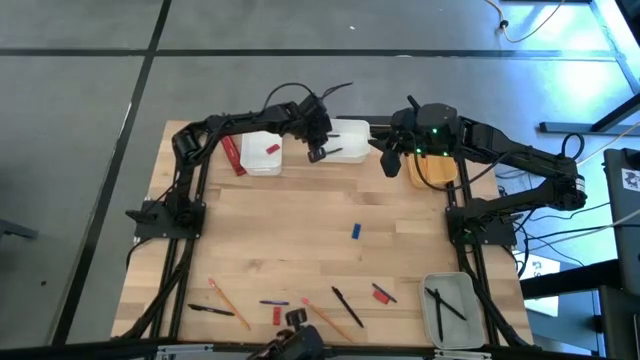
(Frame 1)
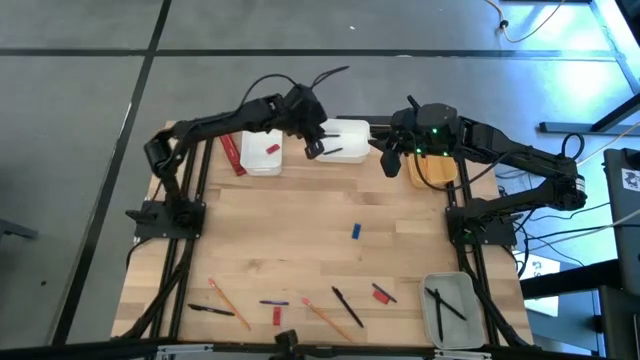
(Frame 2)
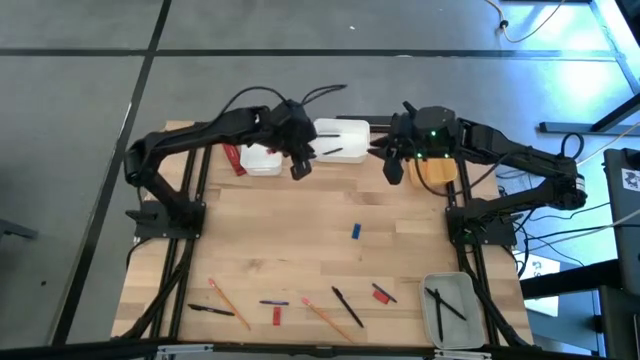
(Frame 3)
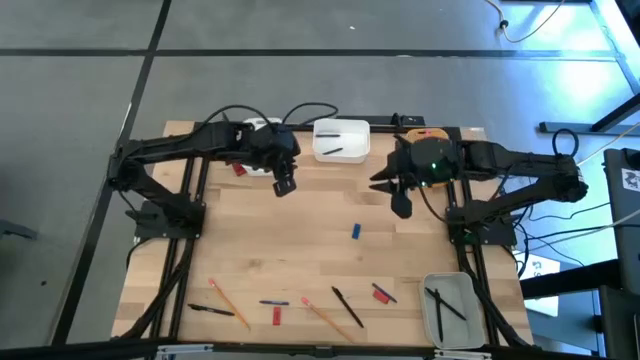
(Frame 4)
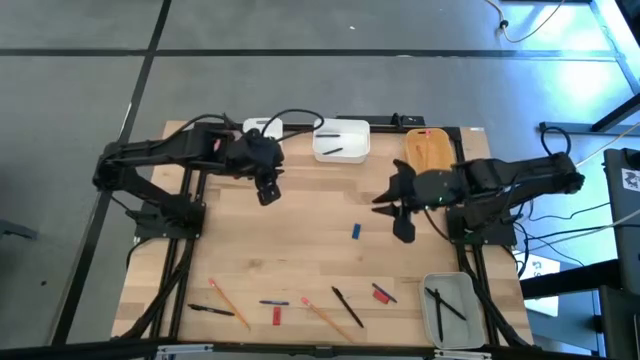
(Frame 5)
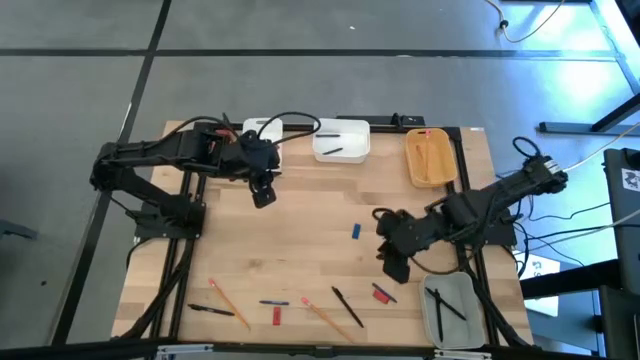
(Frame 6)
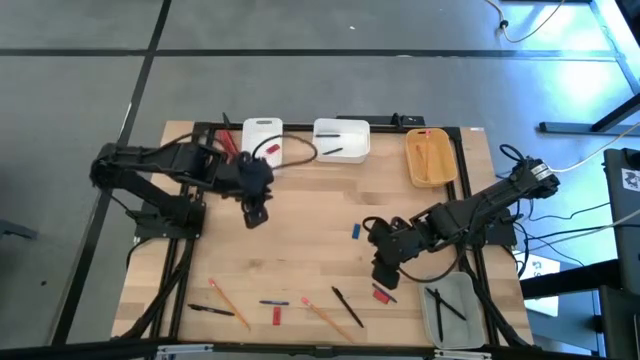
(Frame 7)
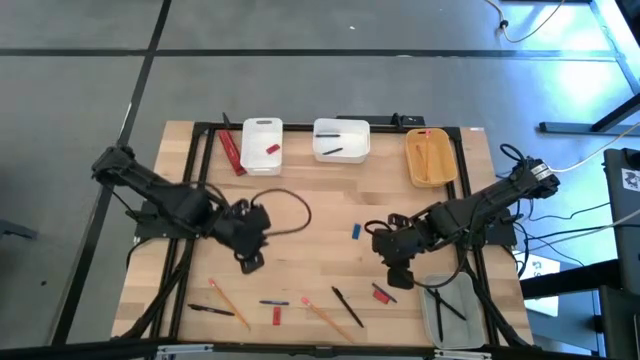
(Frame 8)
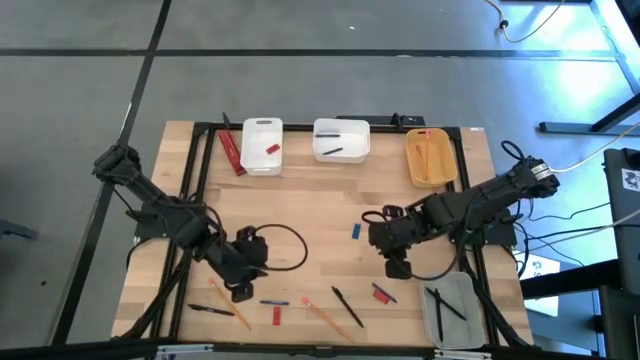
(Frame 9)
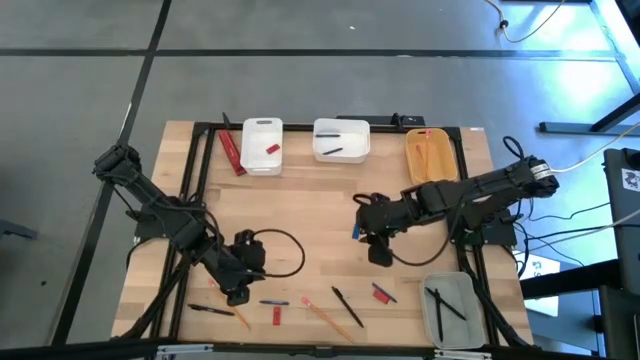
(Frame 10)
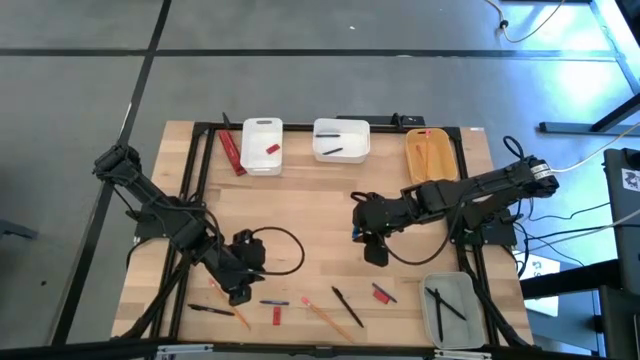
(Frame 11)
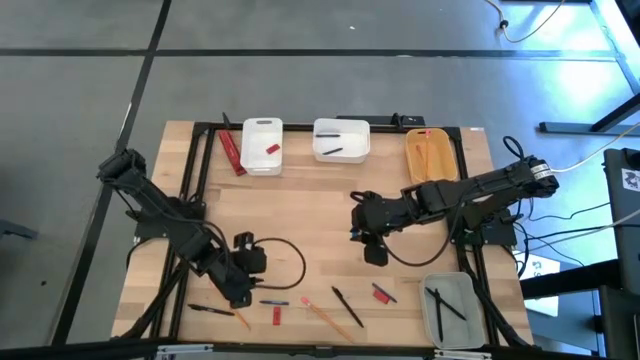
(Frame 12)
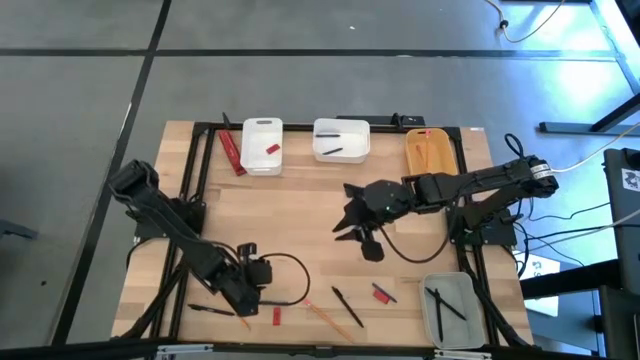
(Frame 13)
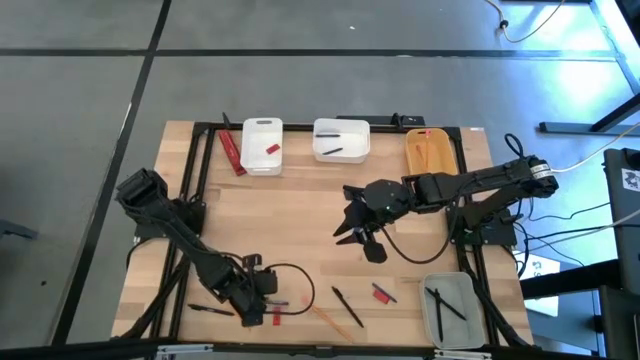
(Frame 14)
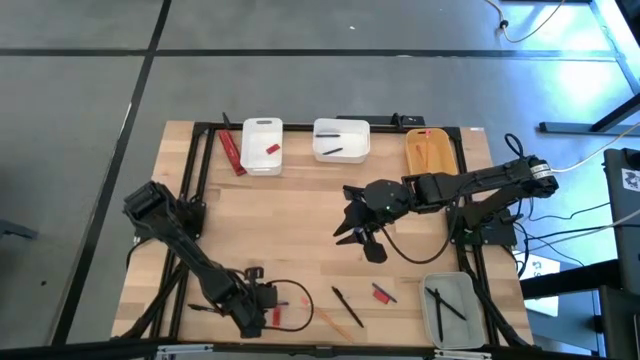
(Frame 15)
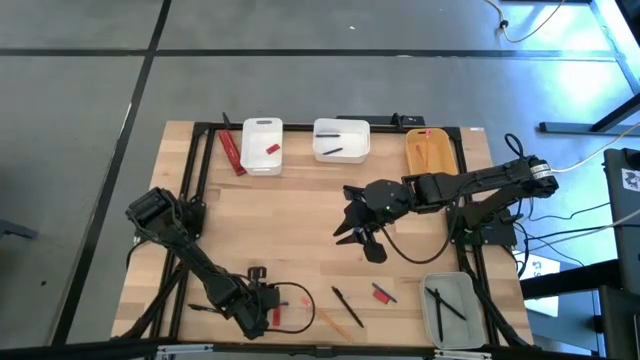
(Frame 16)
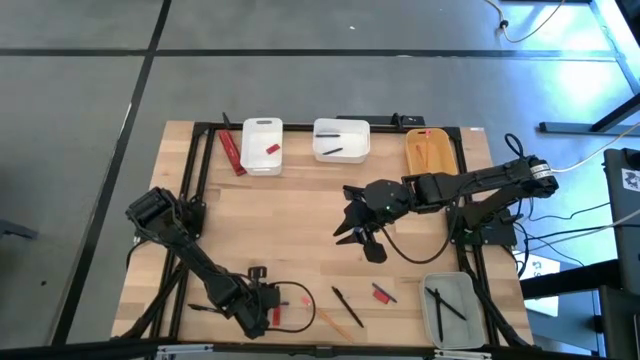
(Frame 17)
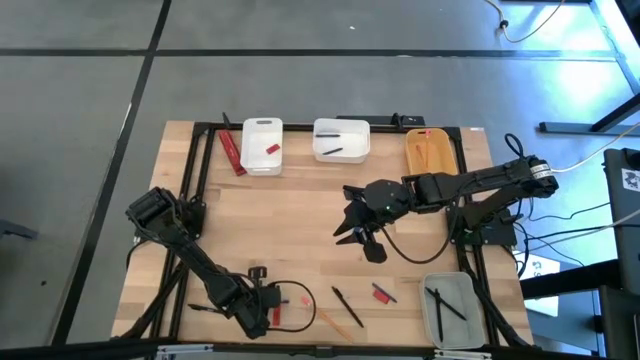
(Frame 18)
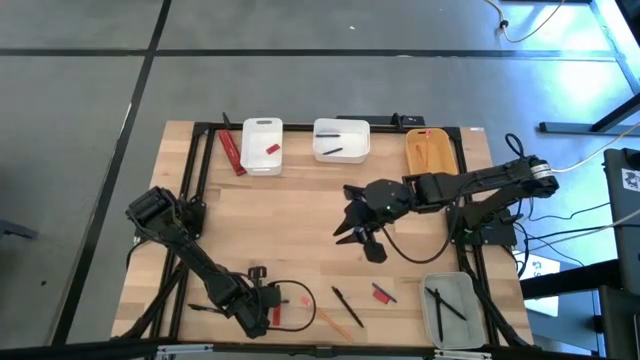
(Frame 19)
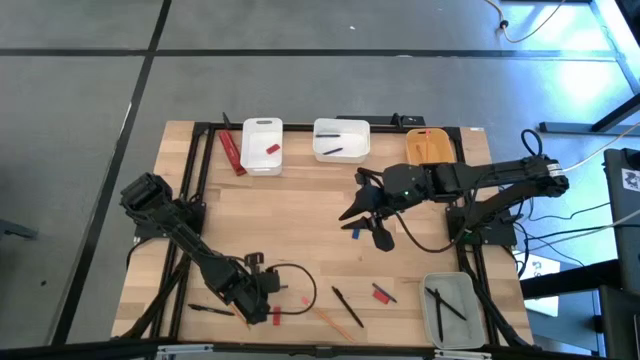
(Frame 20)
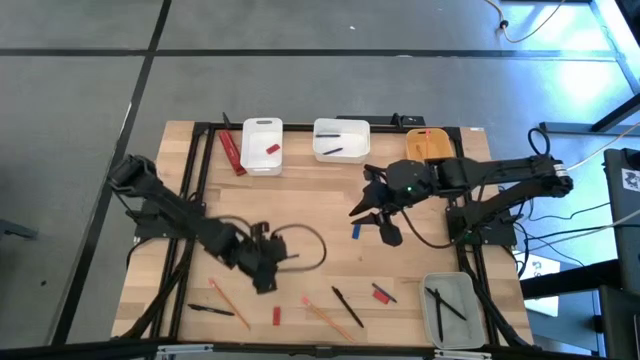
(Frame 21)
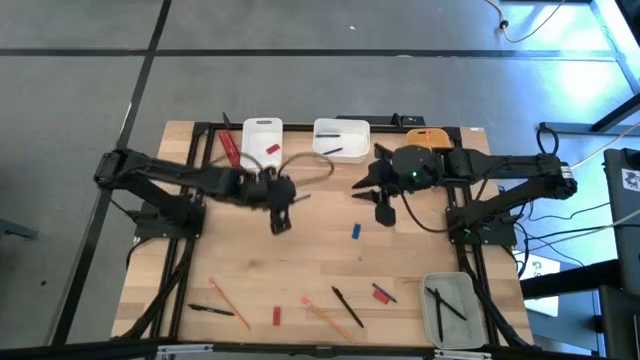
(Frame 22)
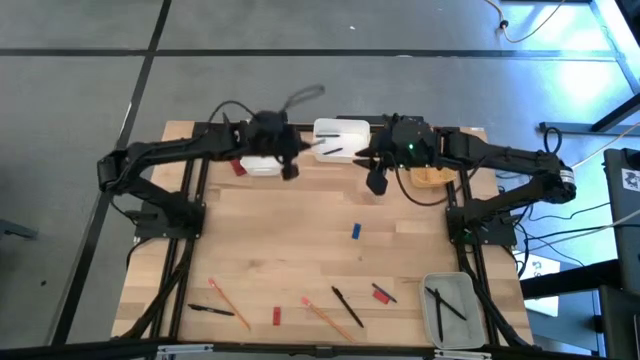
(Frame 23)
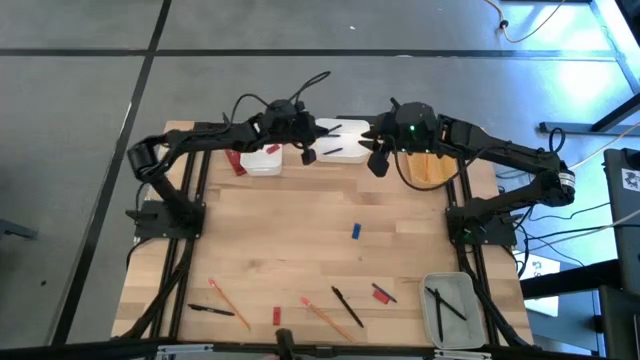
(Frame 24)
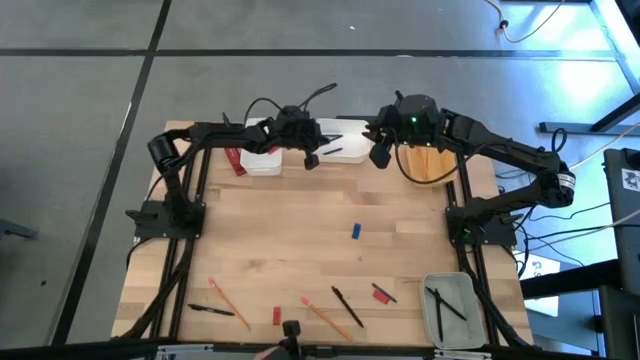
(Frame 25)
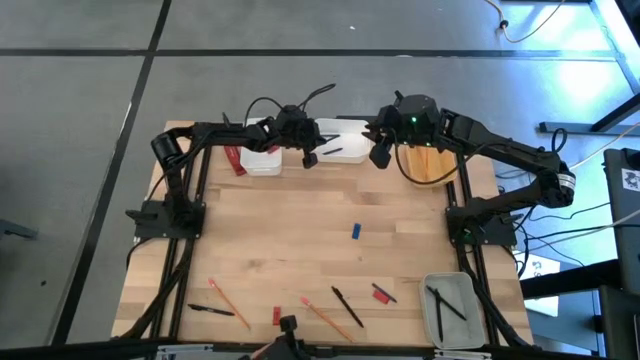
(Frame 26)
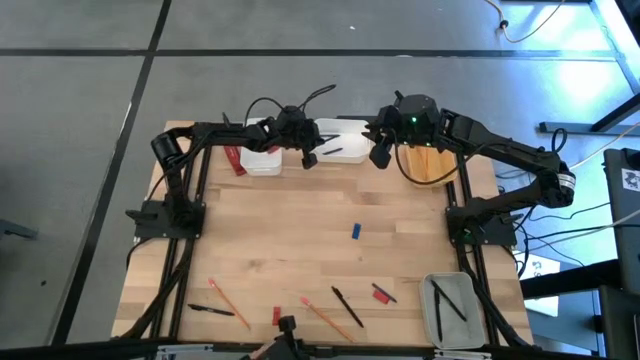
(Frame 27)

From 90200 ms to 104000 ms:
Task: Sort crayons/erasers/pens/pencils in bins
Put the blue crayon into the right white bin

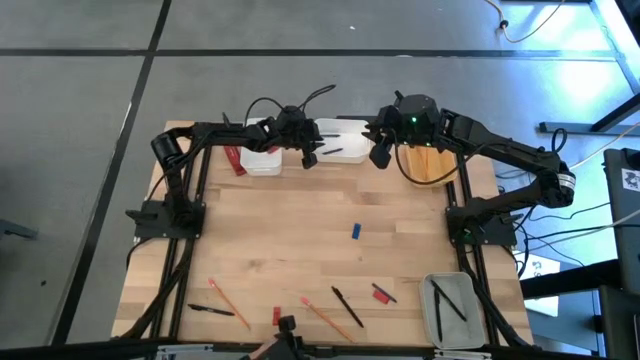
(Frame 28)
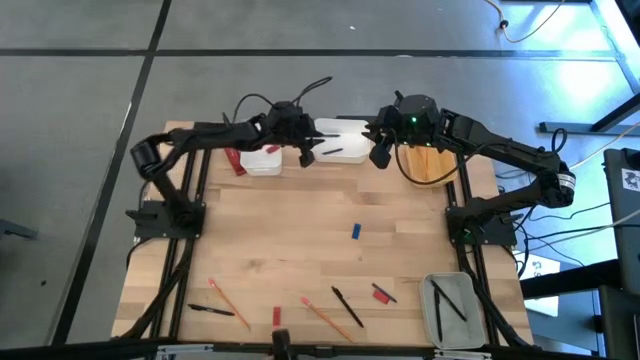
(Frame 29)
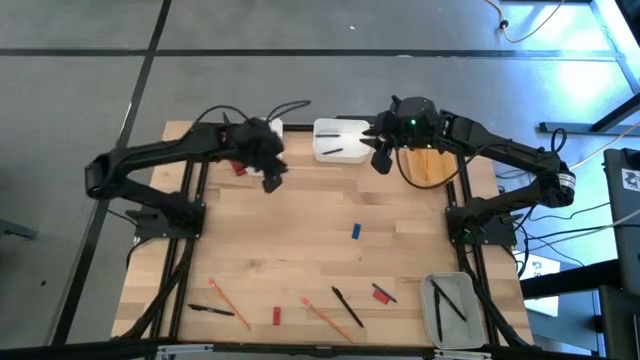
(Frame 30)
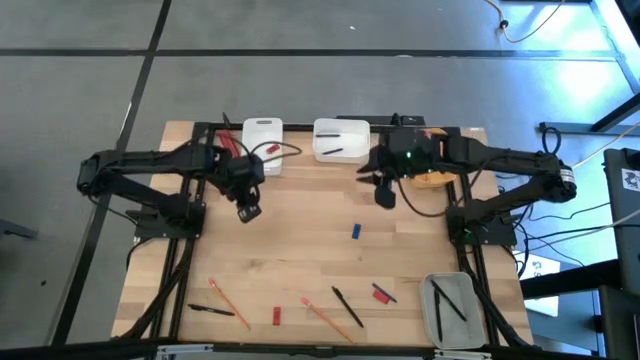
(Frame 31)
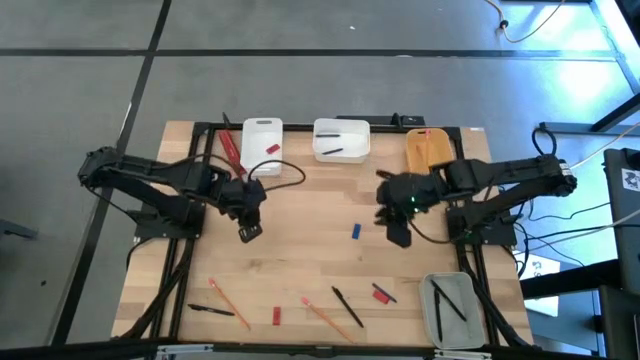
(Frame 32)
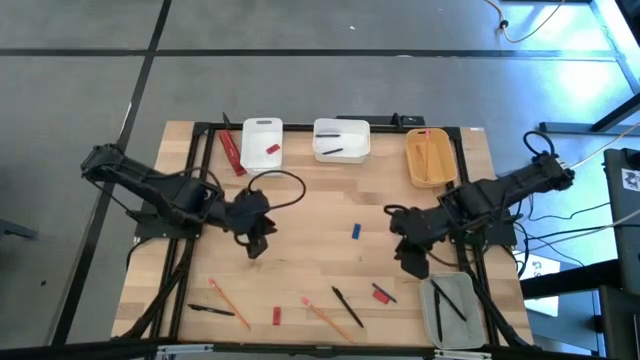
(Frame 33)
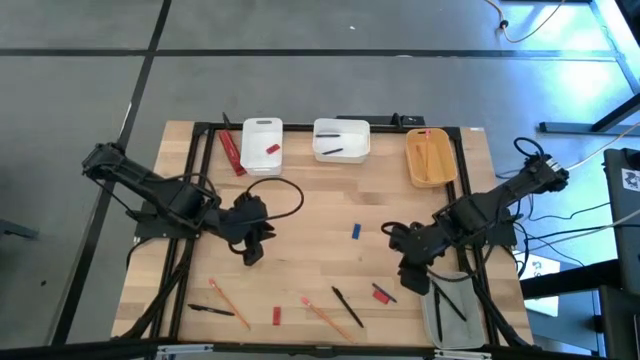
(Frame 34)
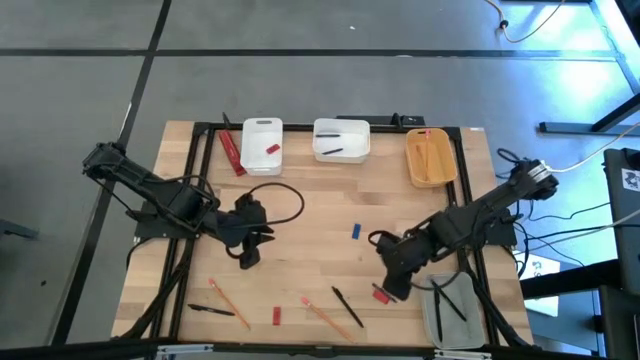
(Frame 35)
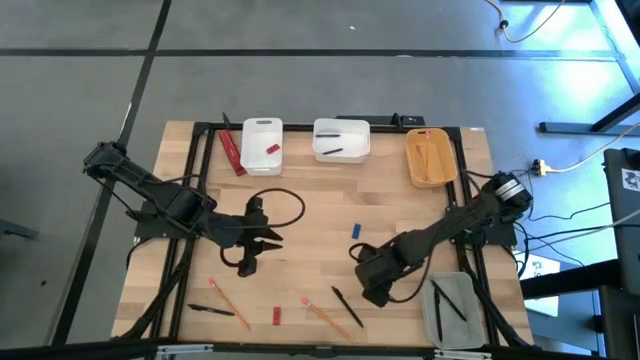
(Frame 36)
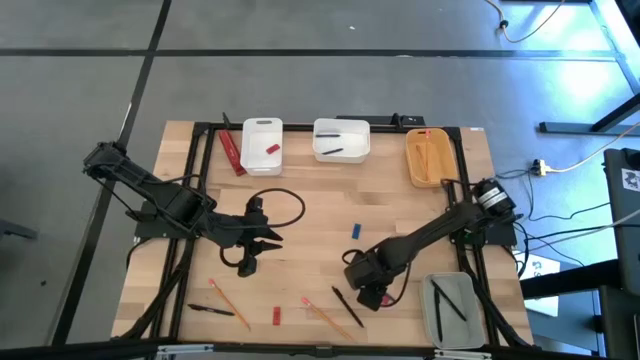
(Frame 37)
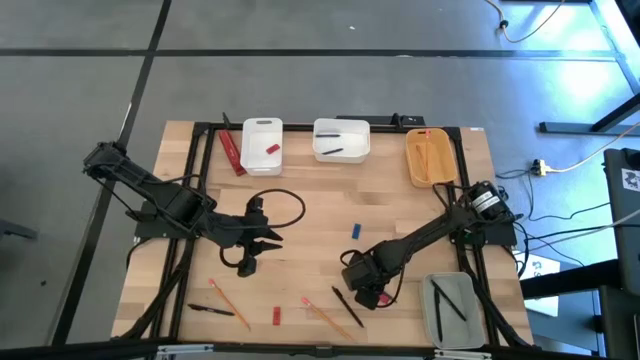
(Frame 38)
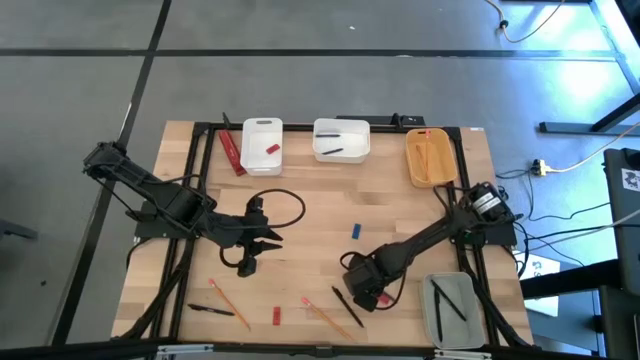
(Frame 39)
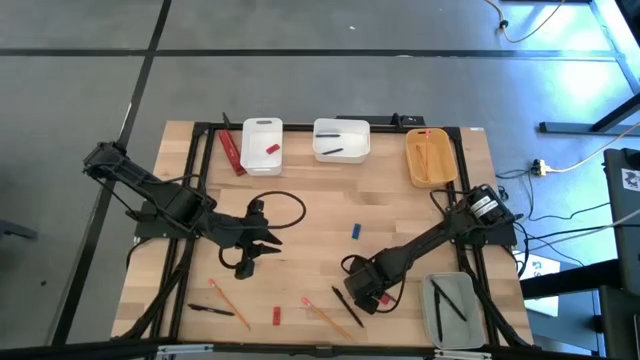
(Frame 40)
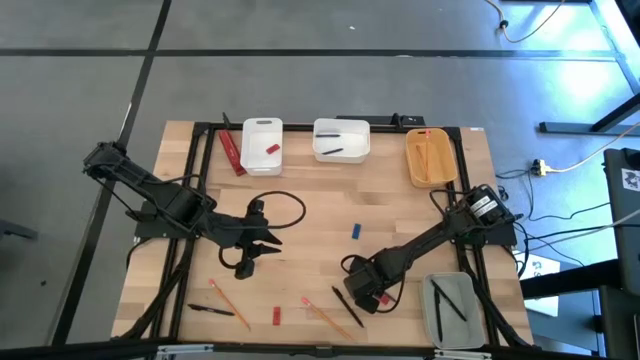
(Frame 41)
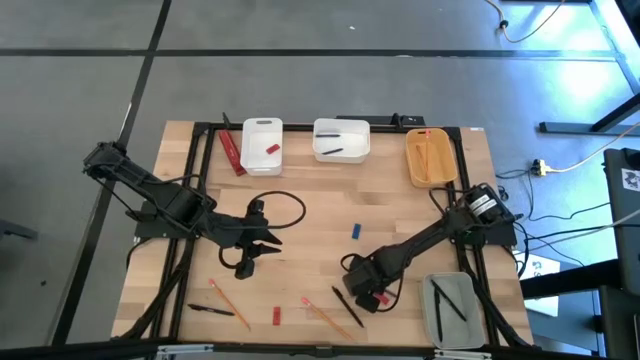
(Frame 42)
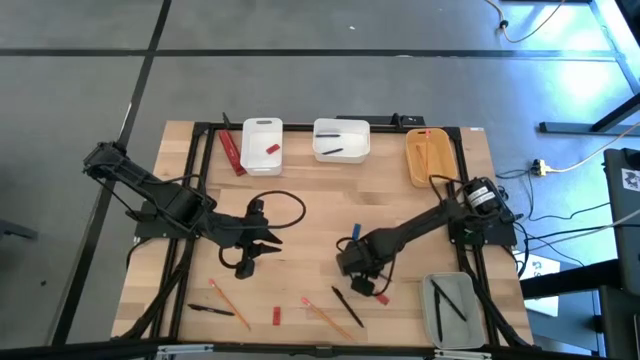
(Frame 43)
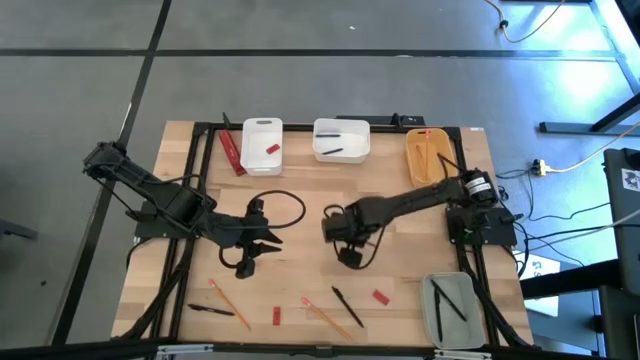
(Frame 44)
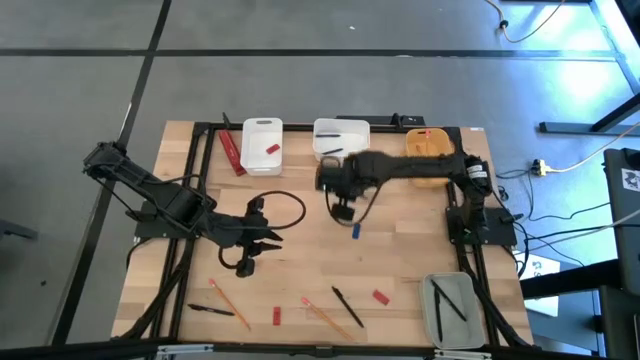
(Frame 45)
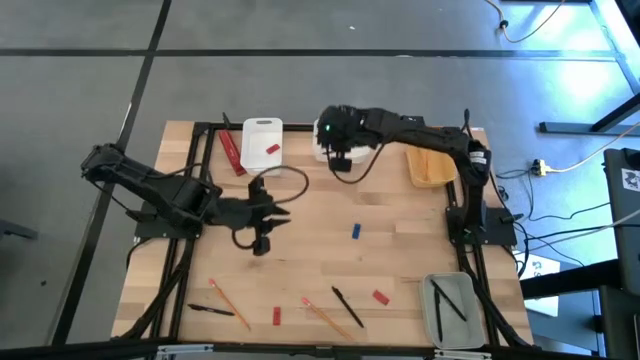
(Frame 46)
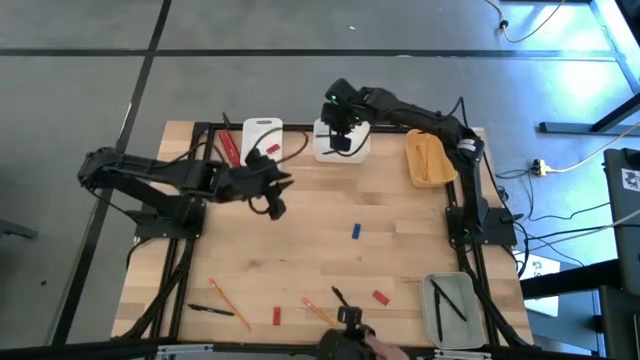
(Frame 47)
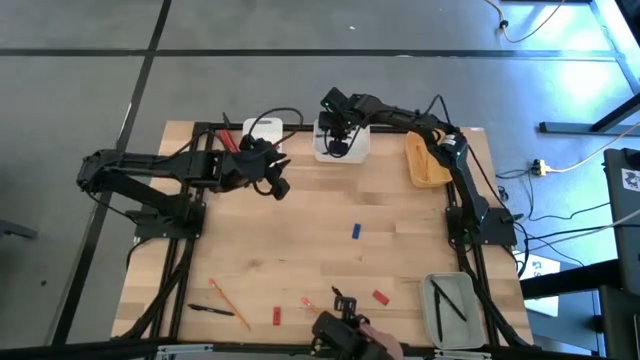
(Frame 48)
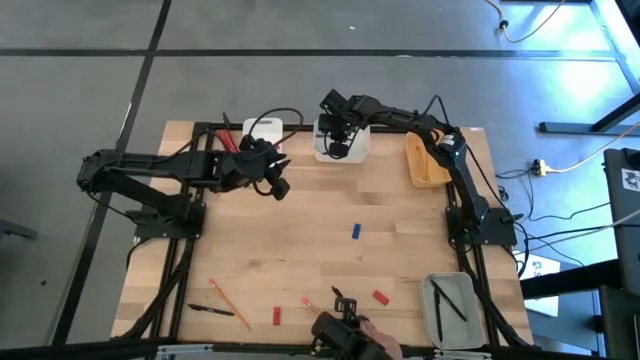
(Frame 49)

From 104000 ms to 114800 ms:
Put the blue crayon into the right white bin
